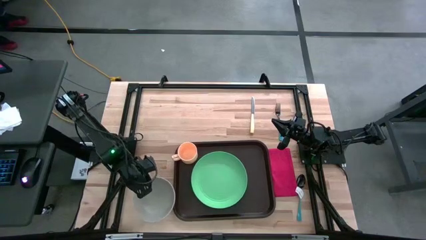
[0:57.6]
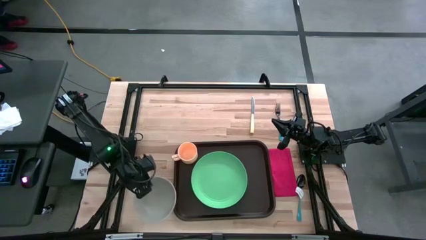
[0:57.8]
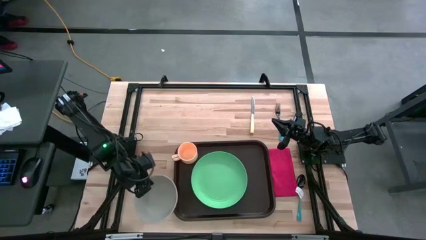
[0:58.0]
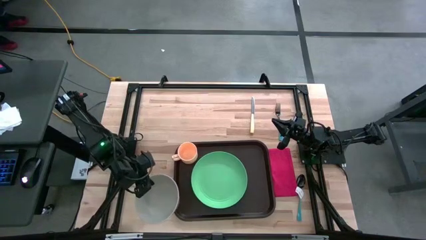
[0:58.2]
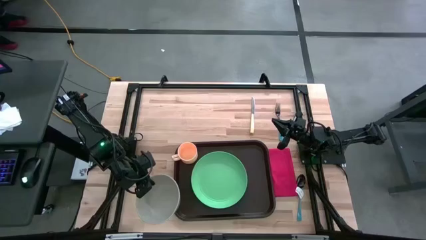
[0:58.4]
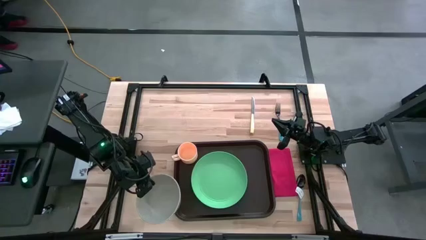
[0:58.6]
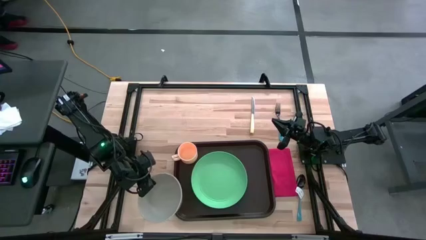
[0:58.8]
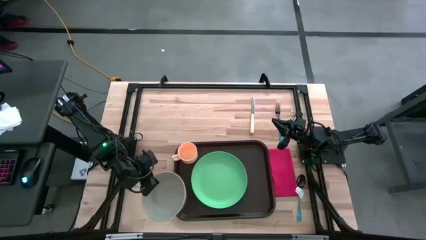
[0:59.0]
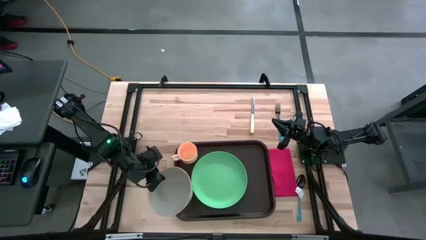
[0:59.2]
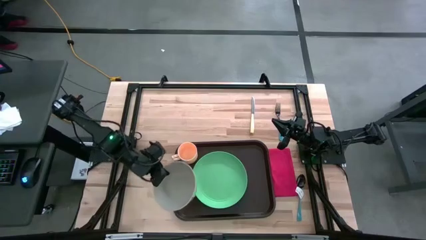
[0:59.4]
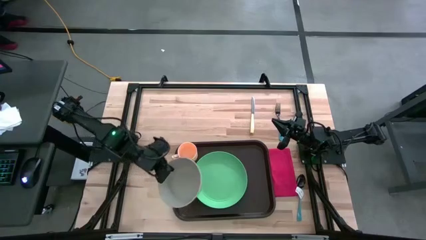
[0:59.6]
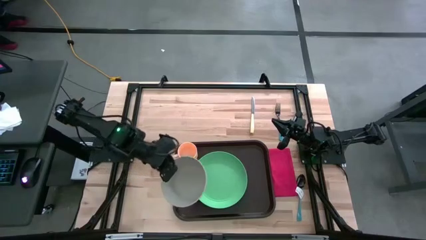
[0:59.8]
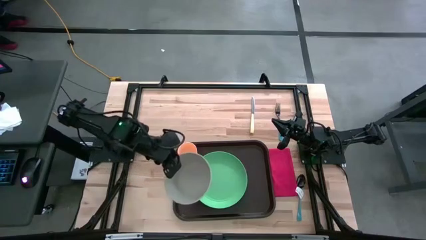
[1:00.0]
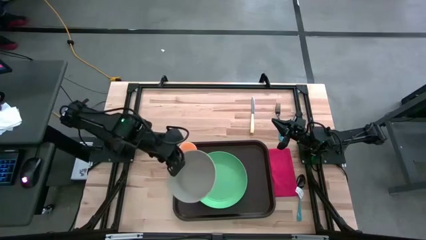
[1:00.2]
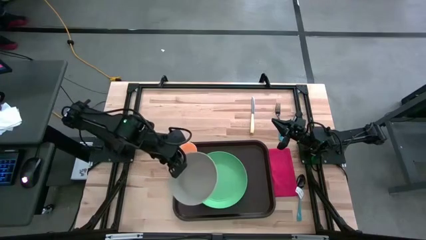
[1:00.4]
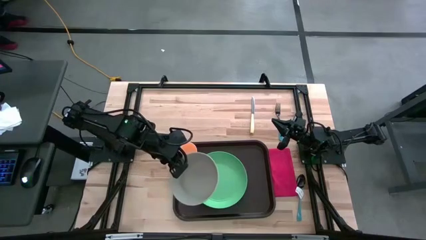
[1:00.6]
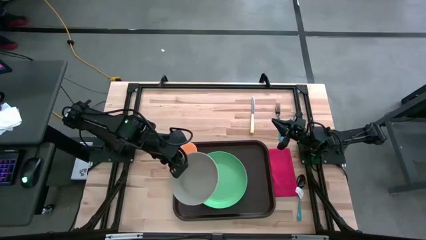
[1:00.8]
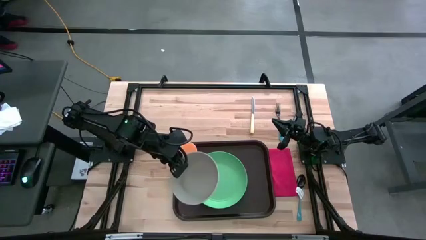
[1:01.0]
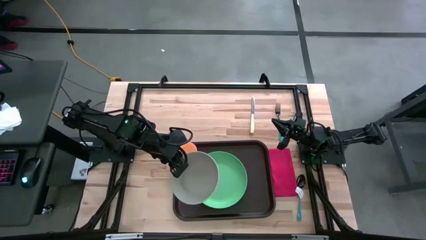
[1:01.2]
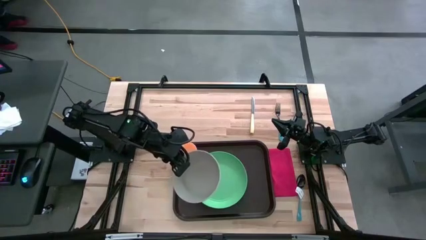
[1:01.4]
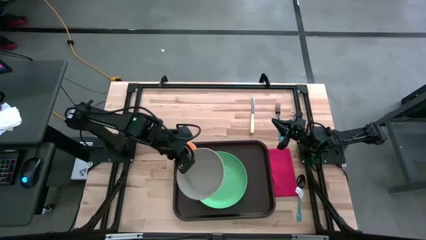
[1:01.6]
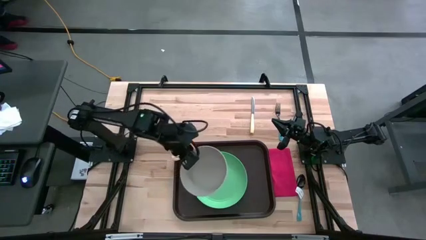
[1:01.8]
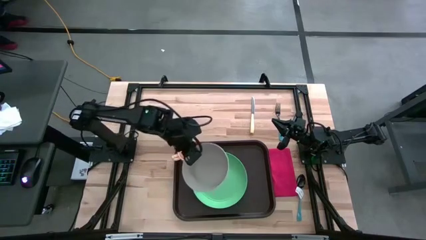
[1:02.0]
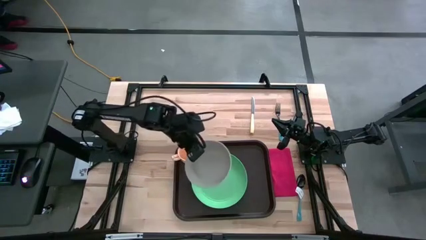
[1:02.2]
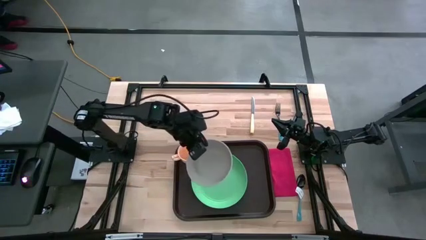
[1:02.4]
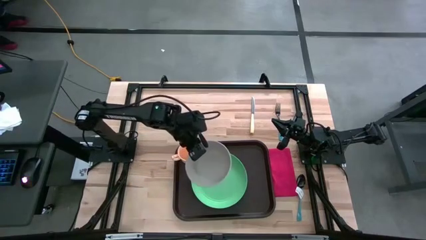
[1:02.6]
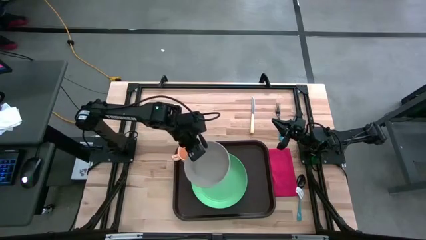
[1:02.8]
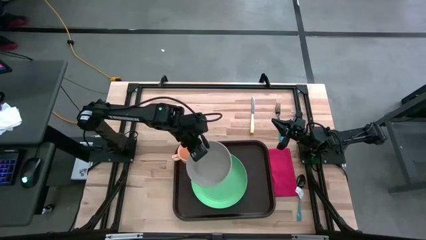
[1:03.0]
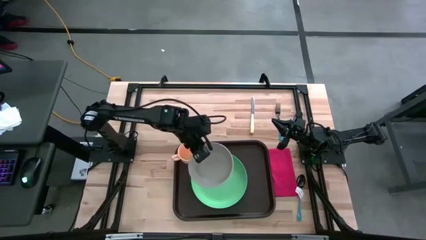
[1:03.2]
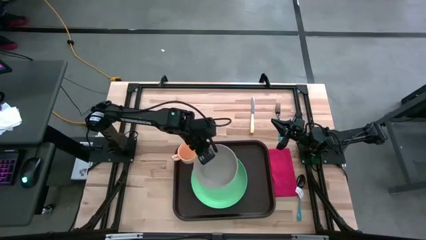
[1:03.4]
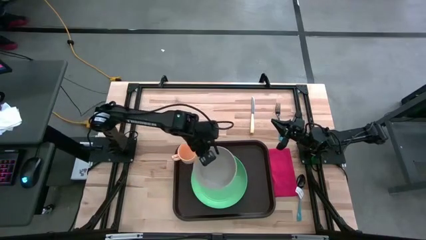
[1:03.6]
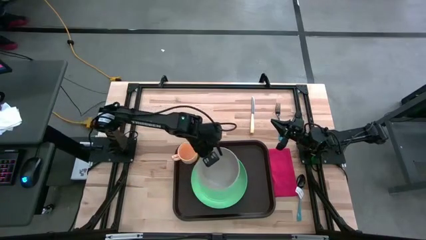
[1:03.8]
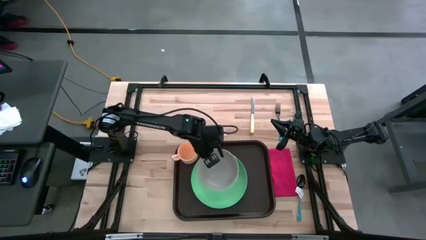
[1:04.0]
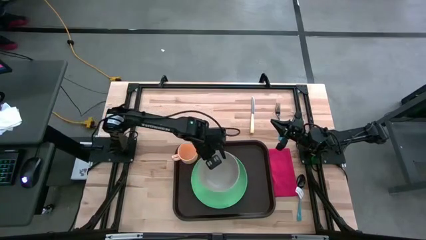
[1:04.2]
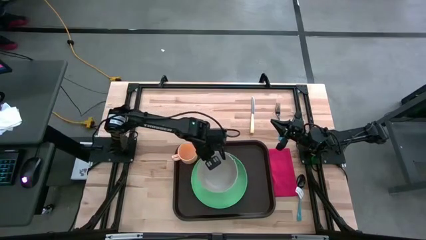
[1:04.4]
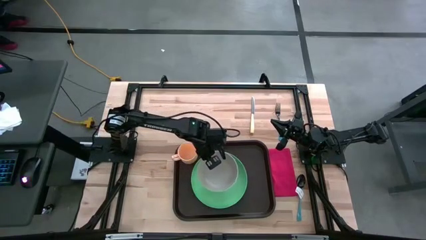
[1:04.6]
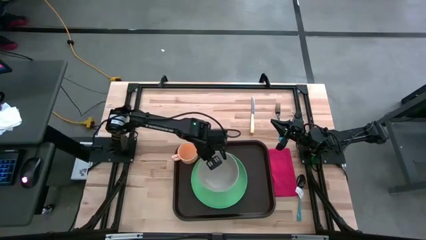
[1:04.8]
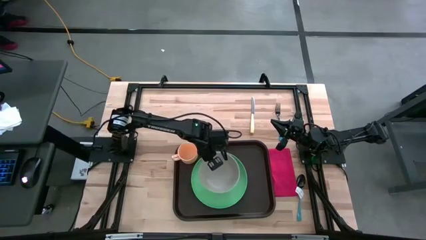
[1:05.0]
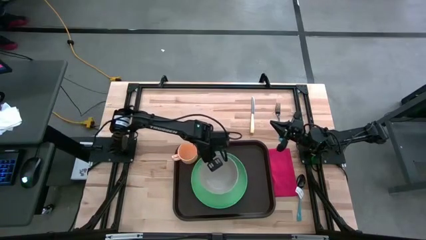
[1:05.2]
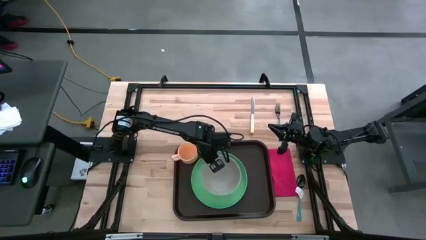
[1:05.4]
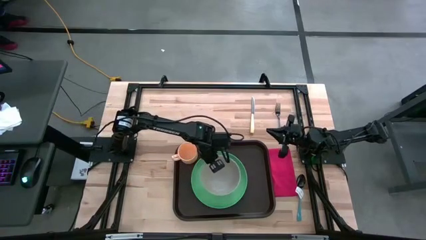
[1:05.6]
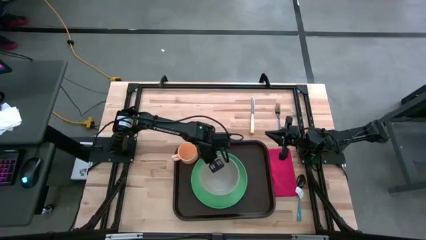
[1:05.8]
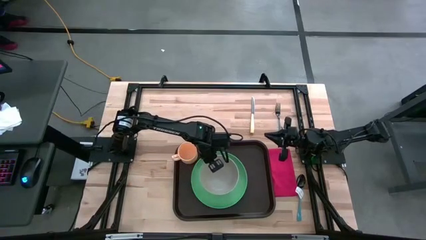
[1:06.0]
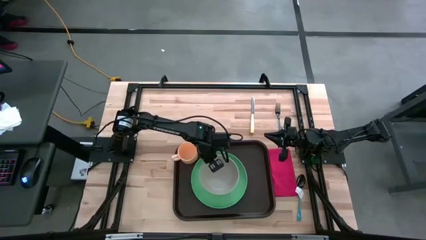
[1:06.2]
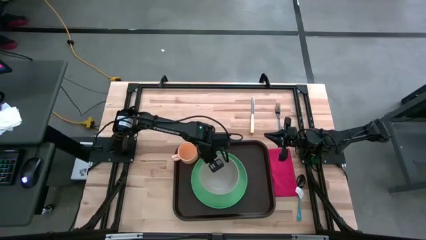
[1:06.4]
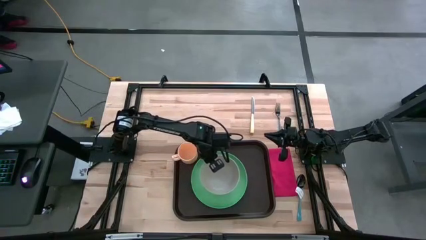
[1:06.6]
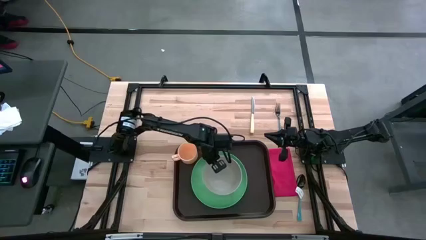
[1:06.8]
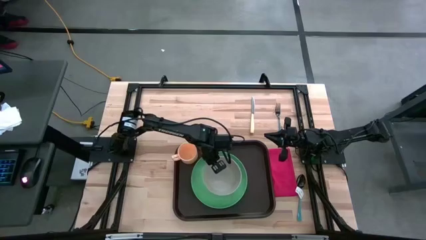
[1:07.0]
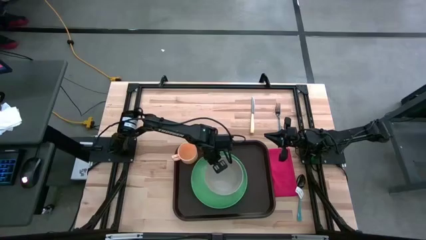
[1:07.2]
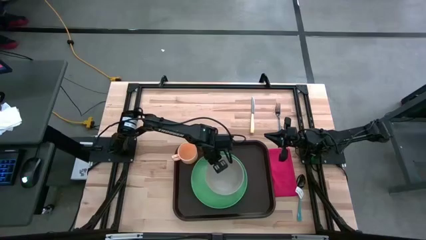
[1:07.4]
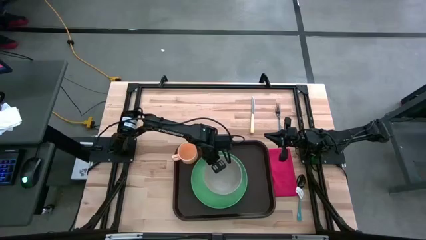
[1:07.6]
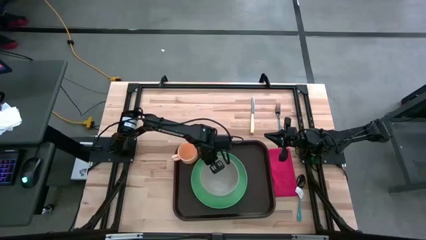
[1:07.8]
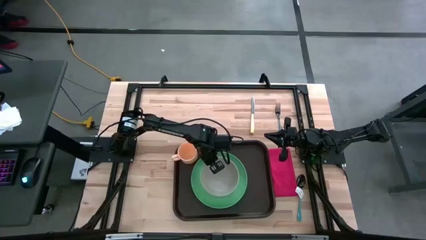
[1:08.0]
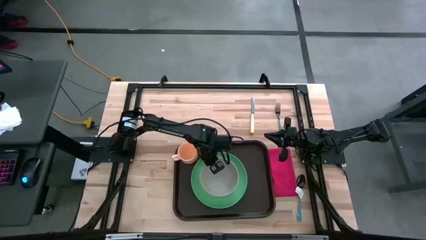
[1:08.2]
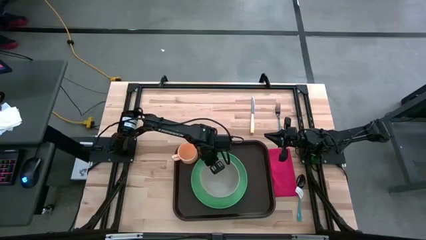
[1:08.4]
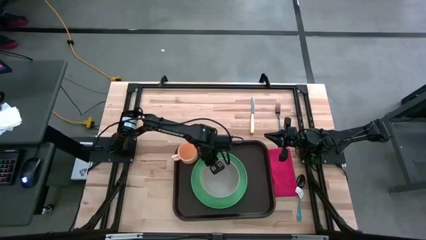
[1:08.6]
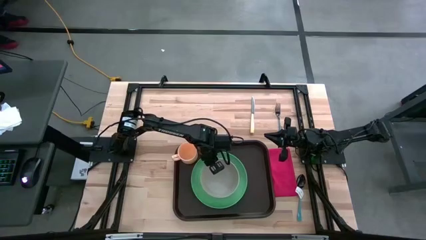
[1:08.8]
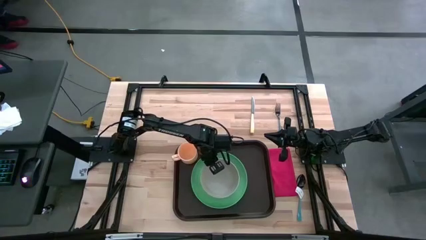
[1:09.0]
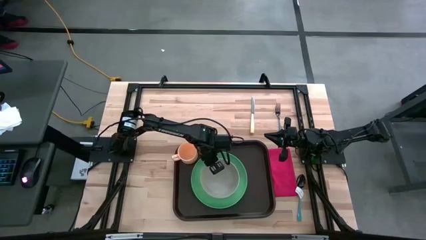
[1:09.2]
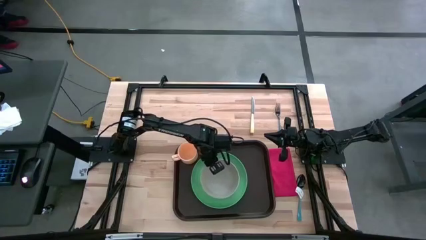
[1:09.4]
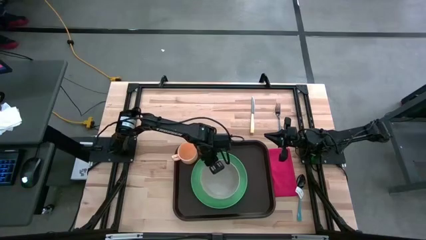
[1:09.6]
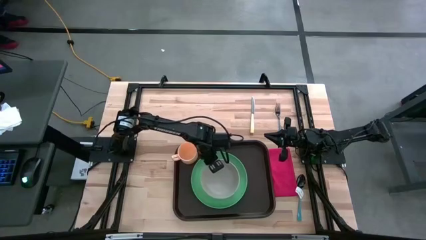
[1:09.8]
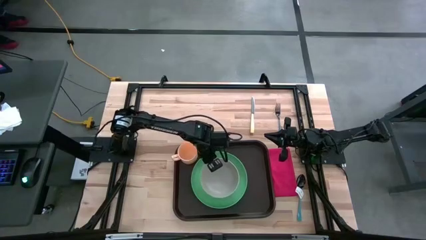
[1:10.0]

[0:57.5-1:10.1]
Task: Set up tray
Put the white bowl on the green plate on the brown serving tray

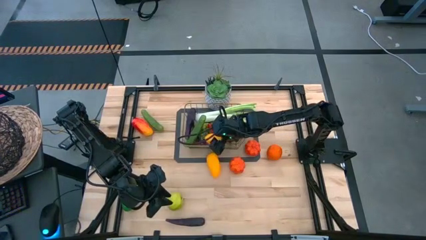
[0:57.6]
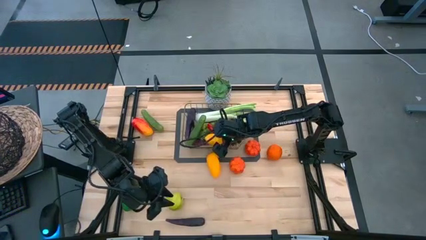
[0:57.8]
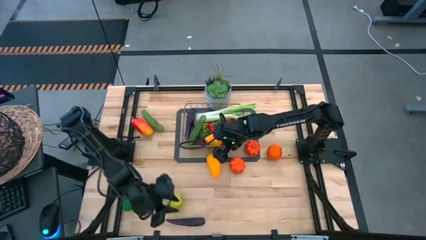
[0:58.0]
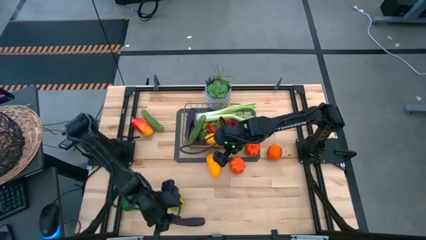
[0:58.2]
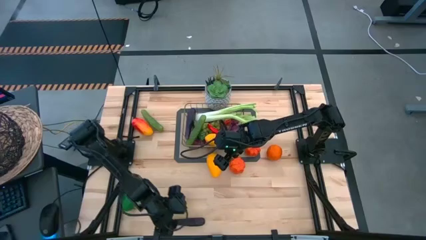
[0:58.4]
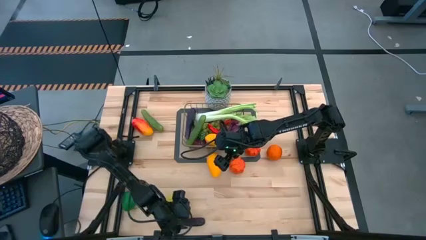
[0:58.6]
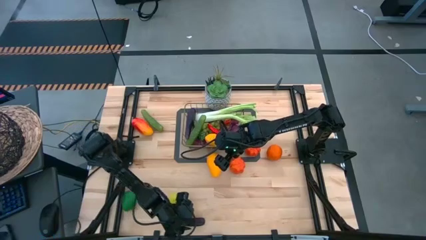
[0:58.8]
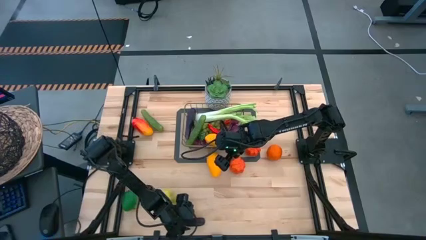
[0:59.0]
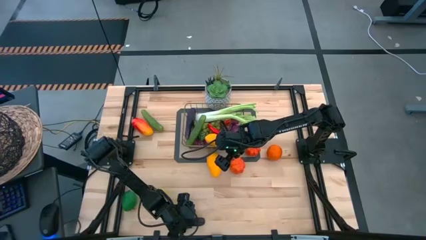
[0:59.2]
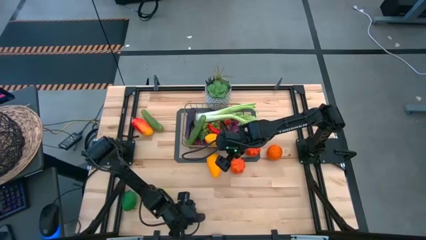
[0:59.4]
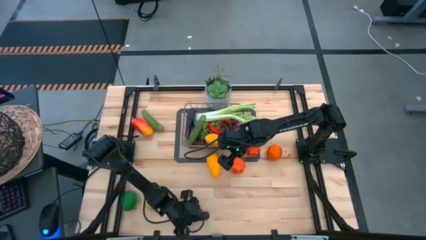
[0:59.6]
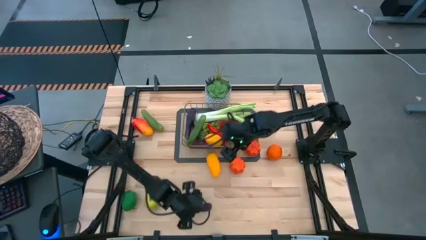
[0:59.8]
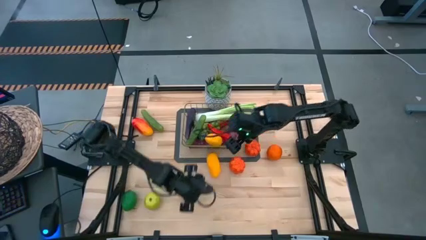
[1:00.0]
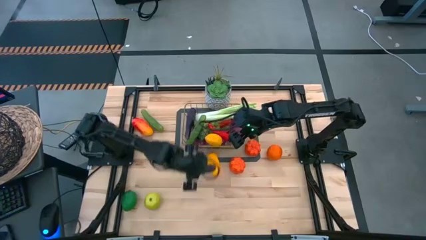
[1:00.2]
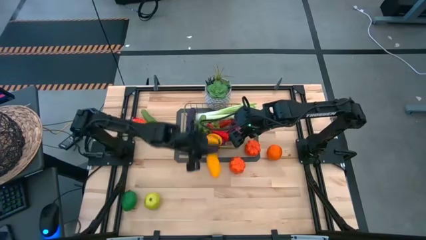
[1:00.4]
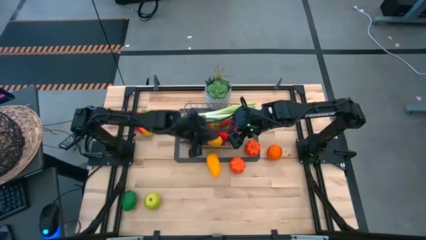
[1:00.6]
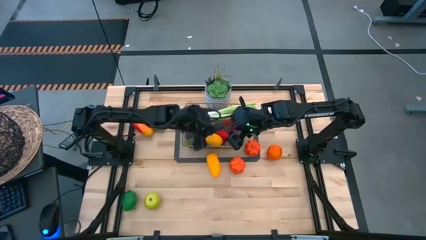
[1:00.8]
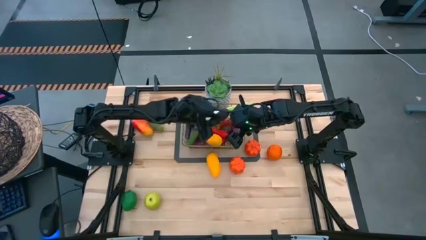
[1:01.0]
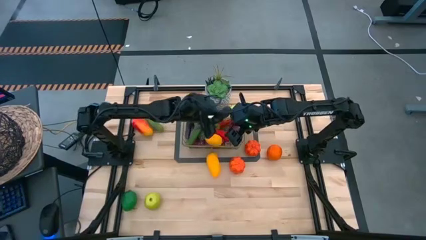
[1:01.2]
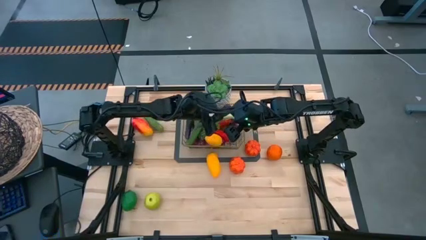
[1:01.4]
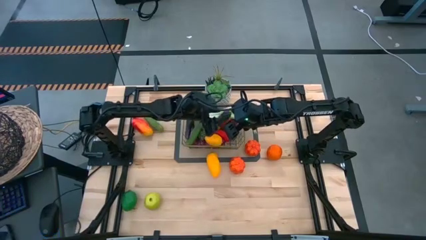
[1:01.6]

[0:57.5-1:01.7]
Task: Build produce basket
Put the eggplant into the wire basket
